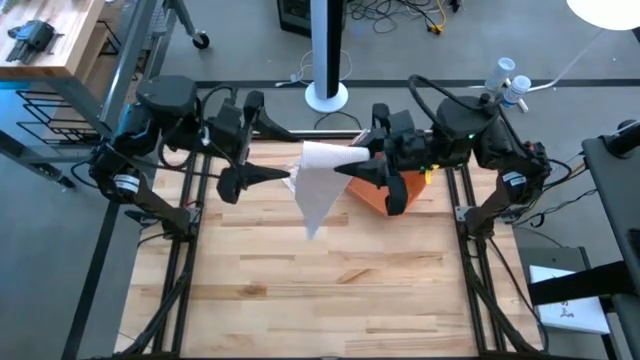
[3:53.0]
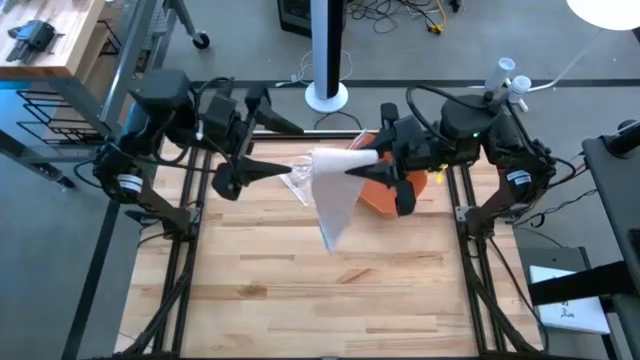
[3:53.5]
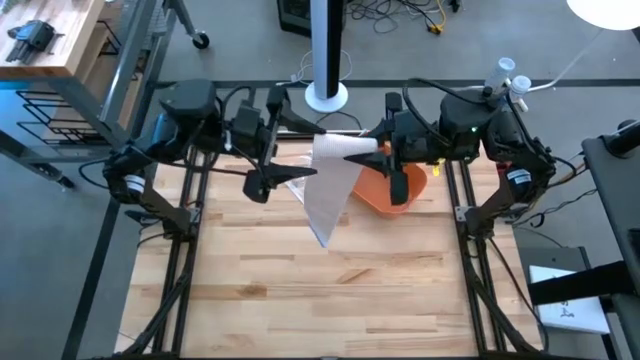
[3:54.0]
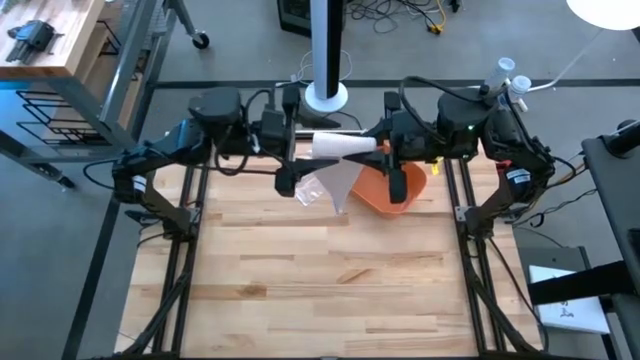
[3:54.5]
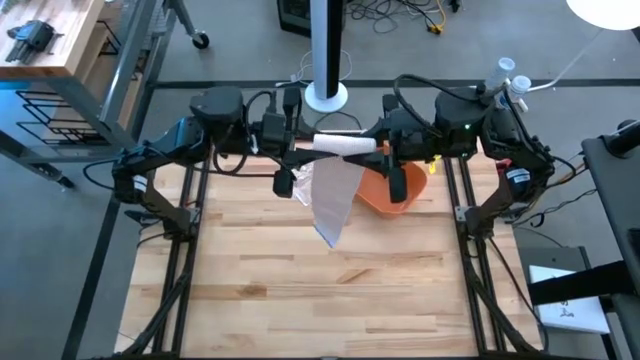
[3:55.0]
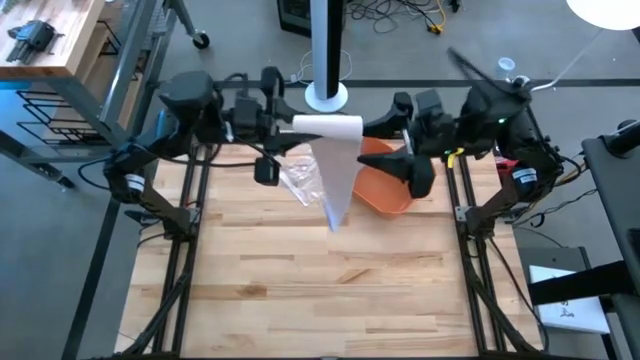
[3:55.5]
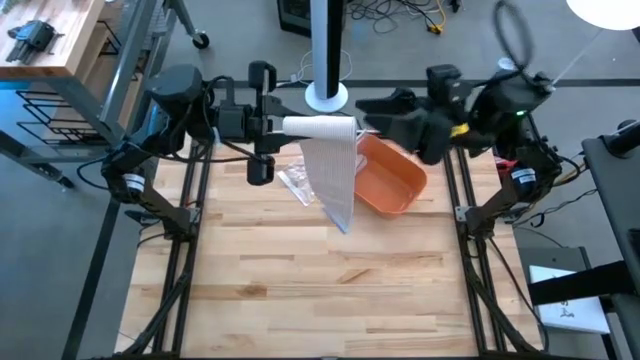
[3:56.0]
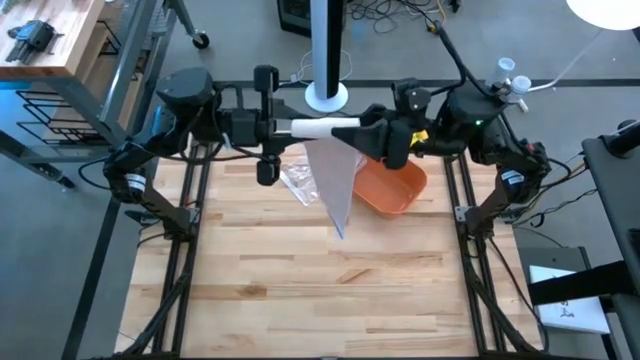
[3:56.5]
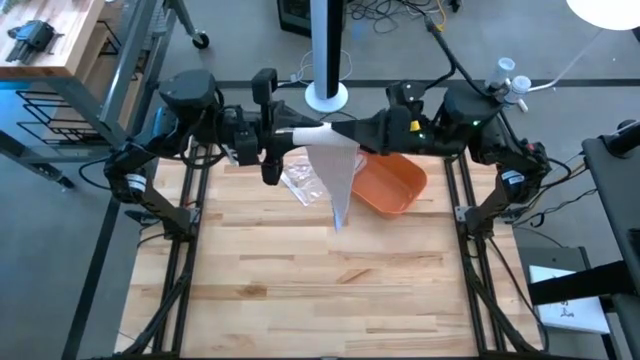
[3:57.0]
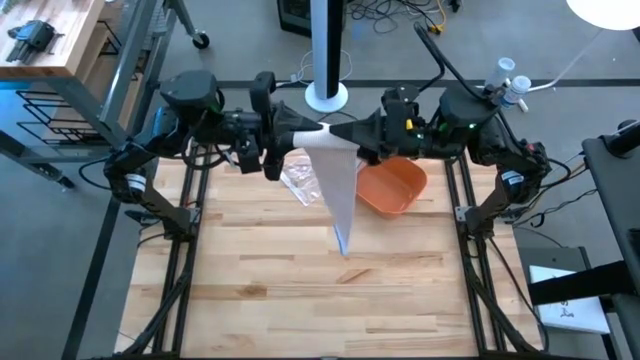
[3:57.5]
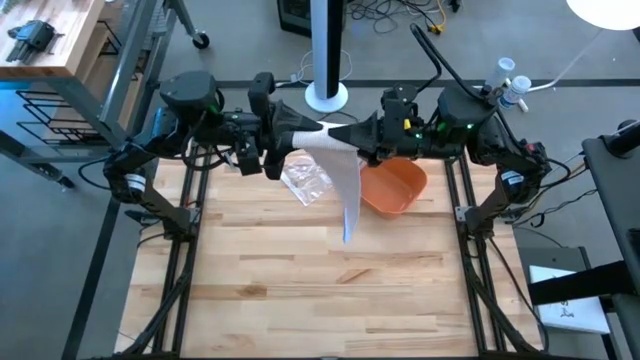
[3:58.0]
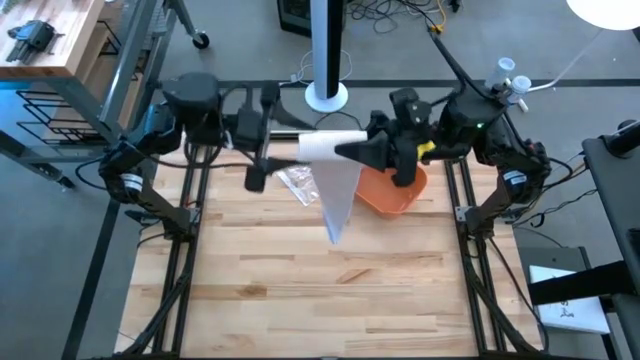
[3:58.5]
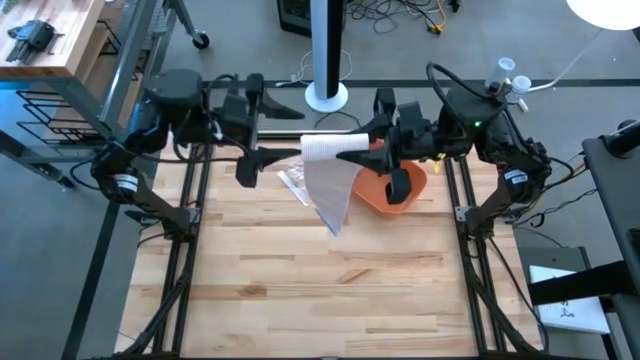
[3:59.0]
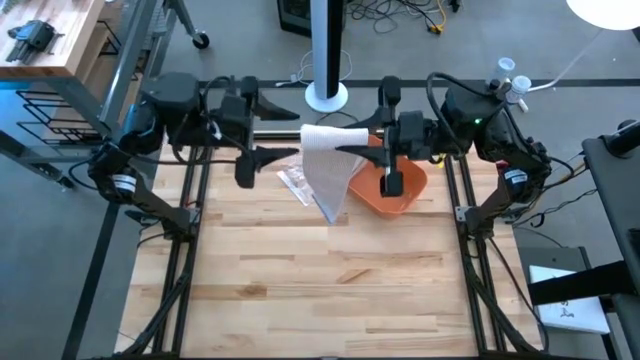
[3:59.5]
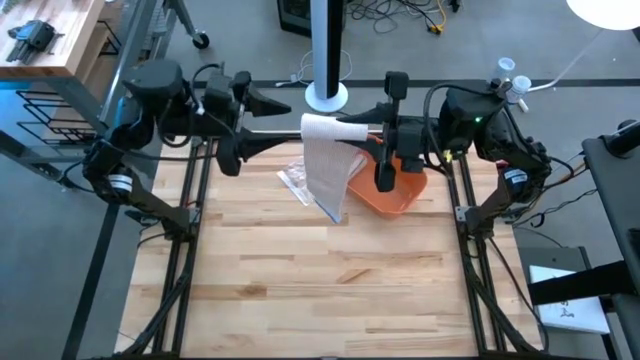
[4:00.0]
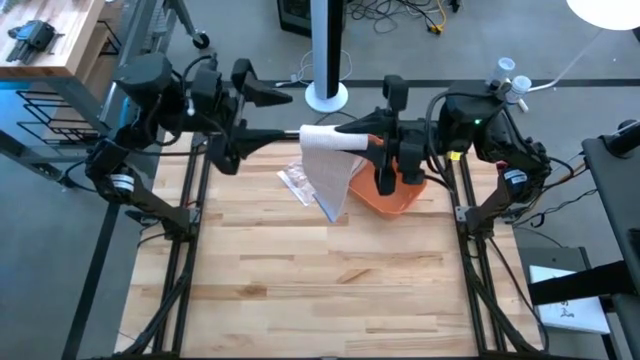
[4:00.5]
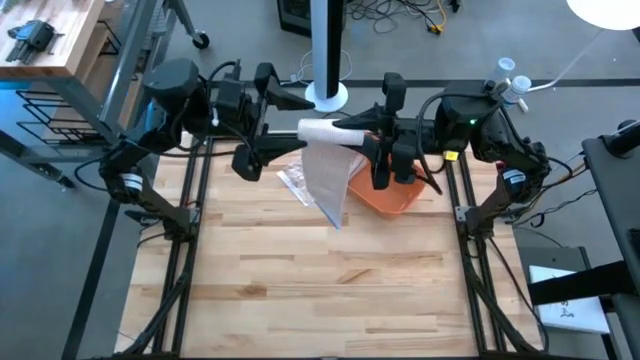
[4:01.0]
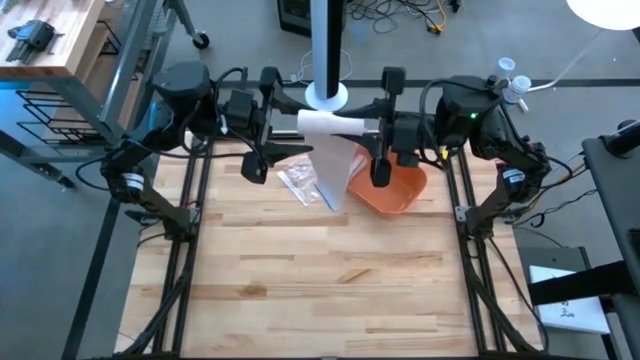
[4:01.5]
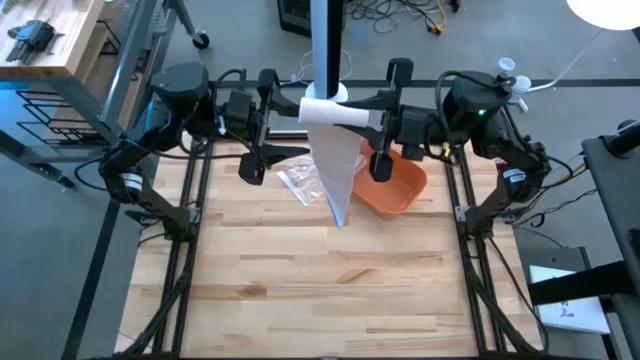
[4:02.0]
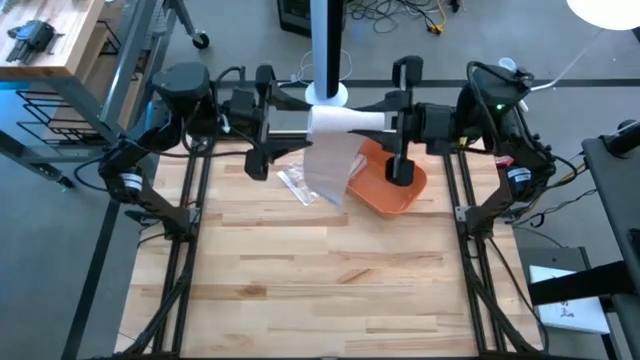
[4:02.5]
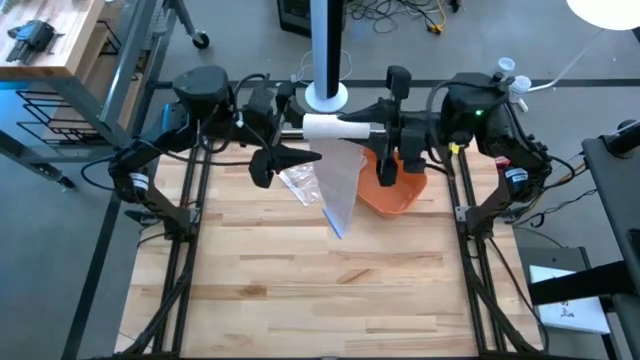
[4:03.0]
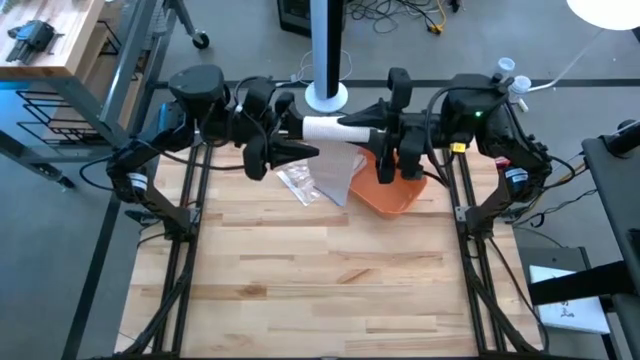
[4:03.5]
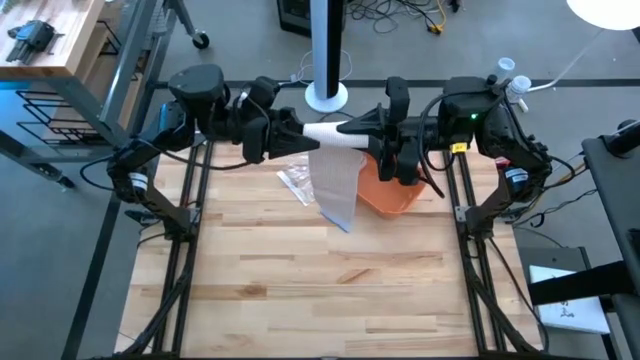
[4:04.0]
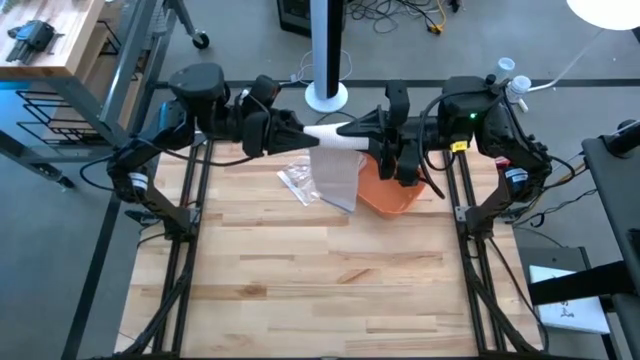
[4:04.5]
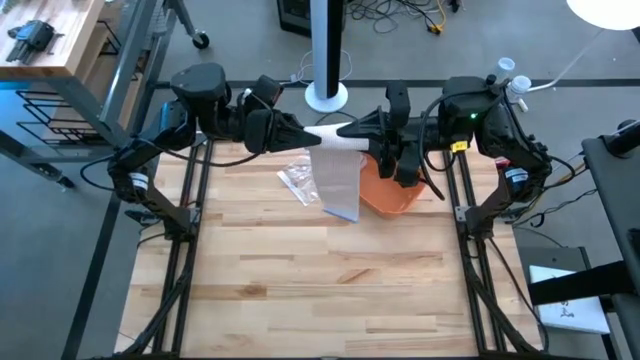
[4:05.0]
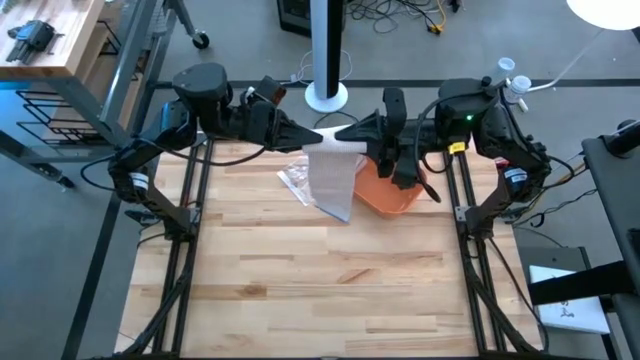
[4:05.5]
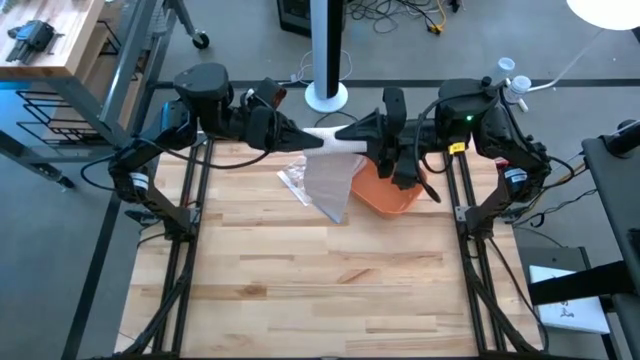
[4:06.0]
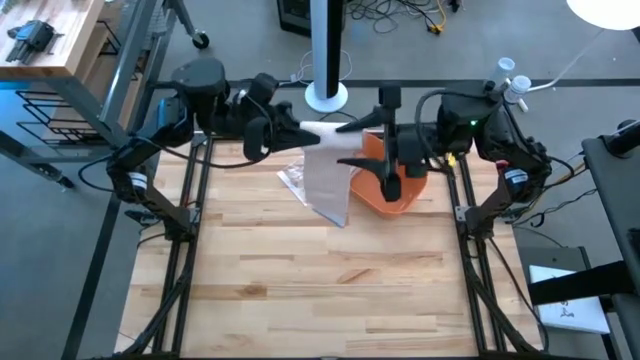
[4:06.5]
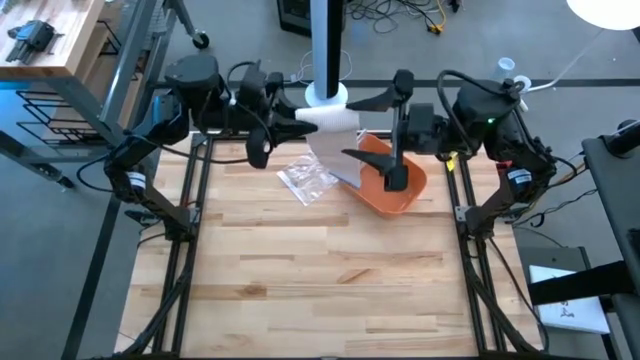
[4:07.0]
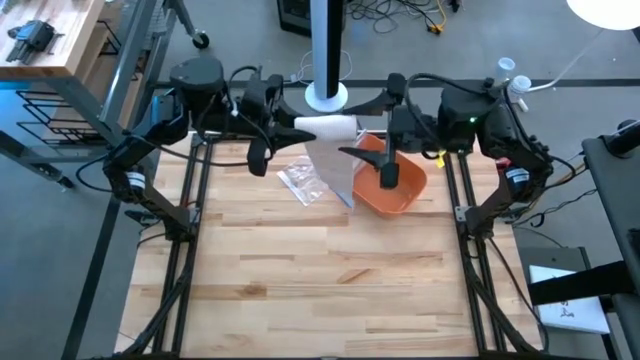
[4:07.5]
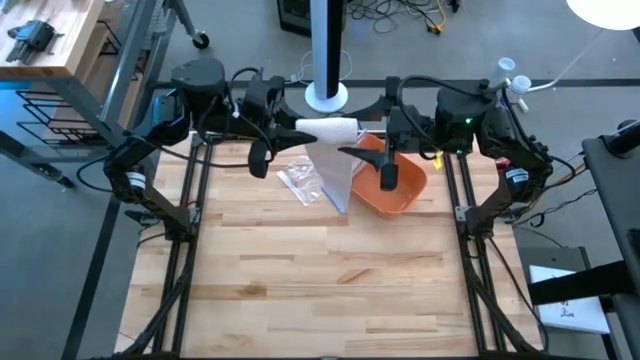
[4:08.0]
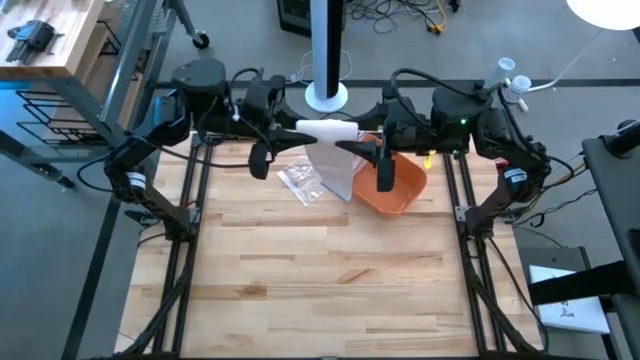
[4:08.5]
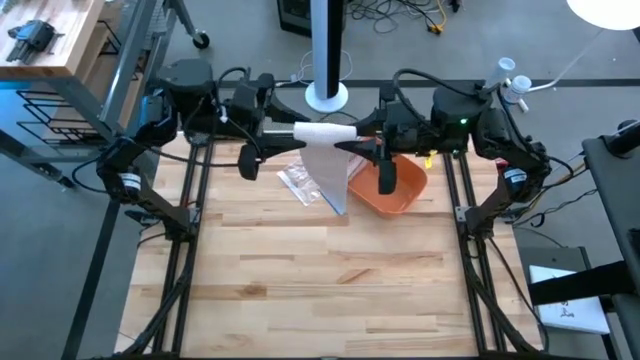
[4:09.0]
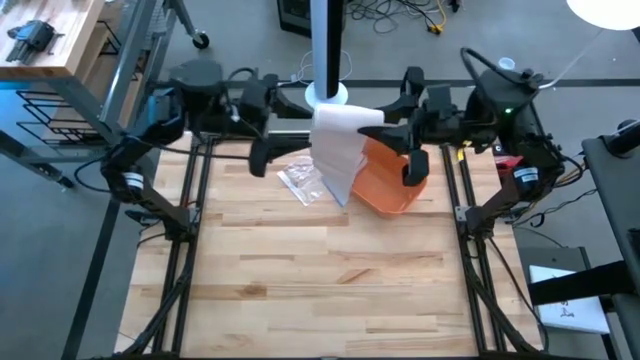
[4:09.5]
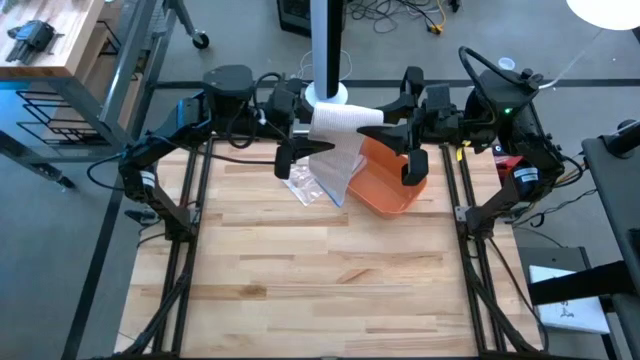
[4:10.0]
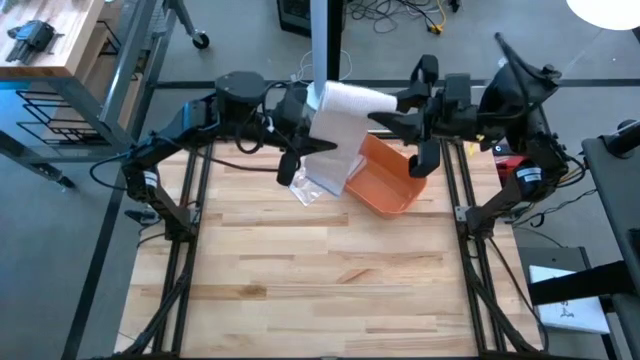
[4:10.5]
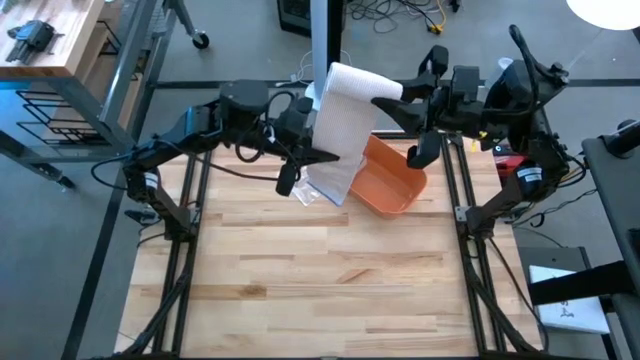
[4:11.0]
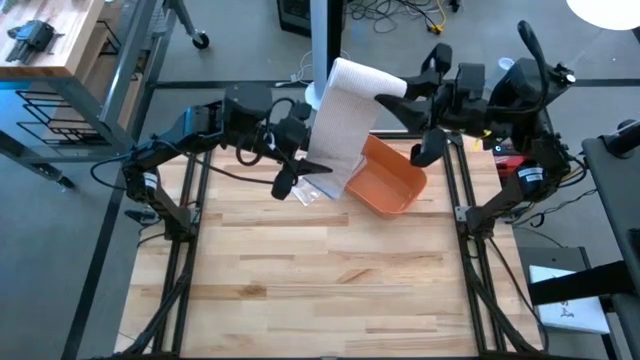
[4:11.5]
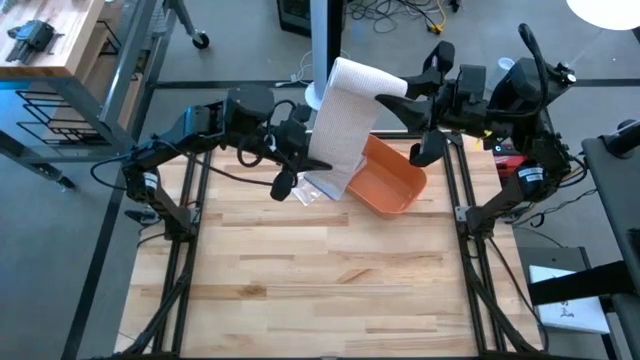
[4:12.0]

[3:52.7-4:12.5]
Task: Roll bandage
Roll the brown bandage

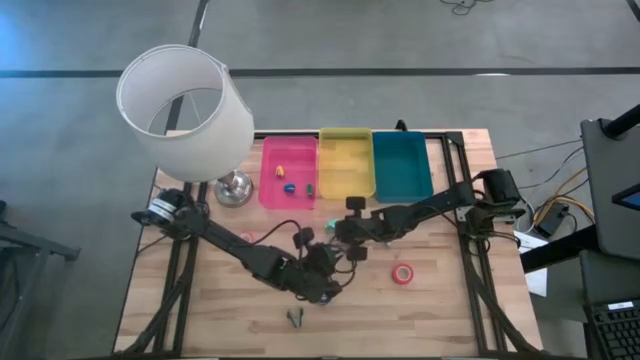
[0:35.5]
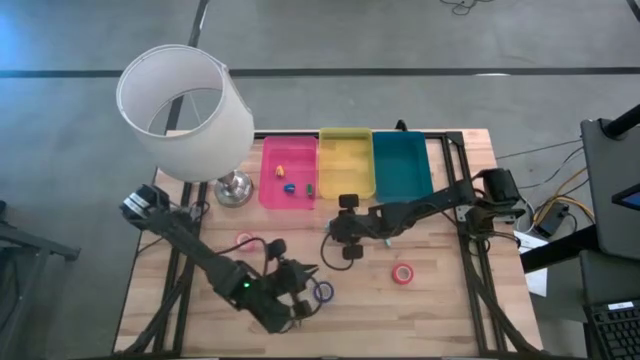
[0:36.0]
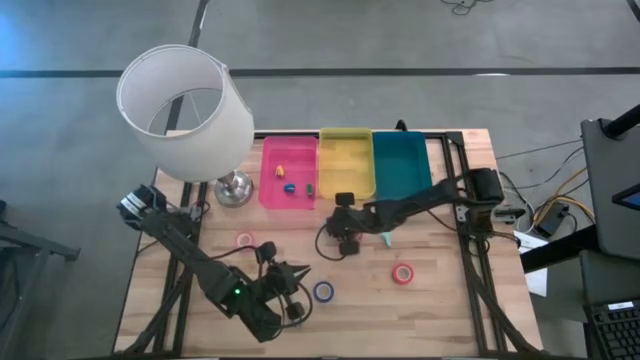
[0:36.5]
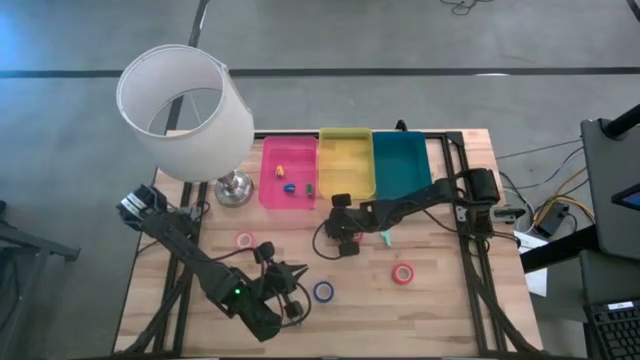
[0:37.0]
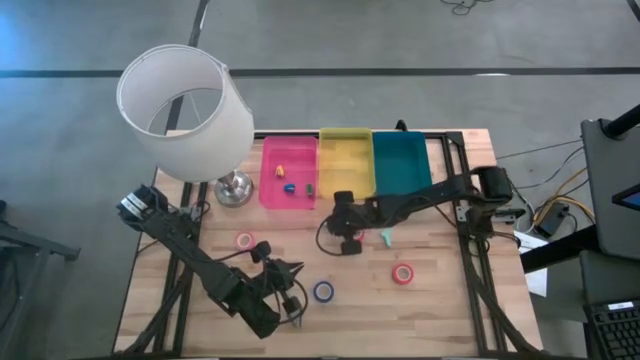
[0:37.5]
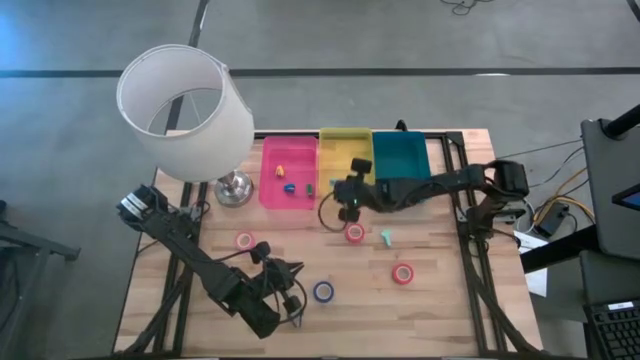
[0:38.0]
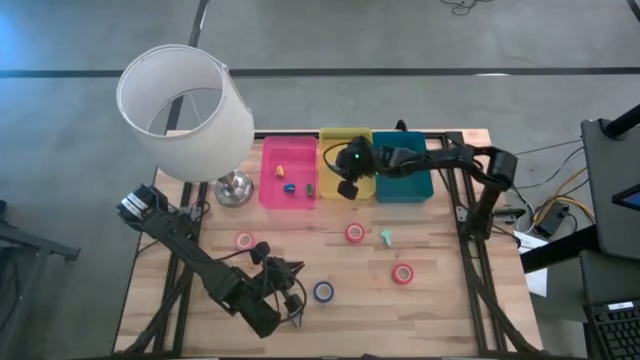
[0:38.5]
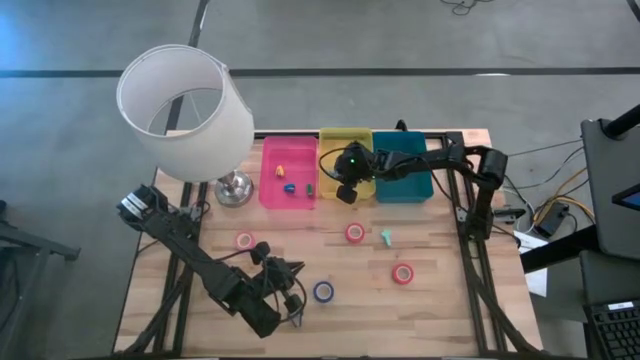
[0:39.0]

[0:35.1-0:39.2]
Task: Pick and place Stapler, Stapler remover, tape
Put the left blue staple remover into the yellow bin
